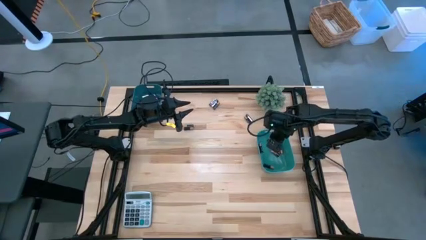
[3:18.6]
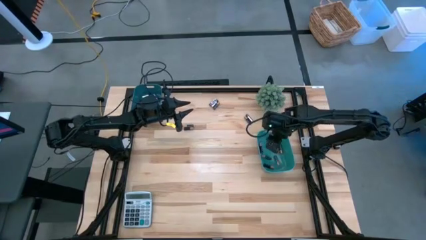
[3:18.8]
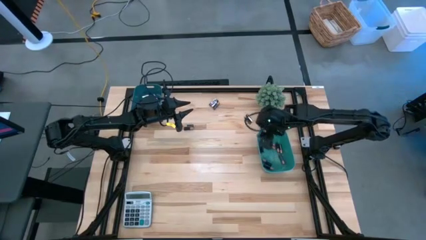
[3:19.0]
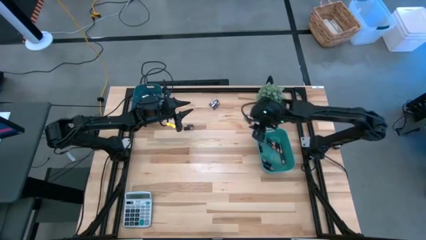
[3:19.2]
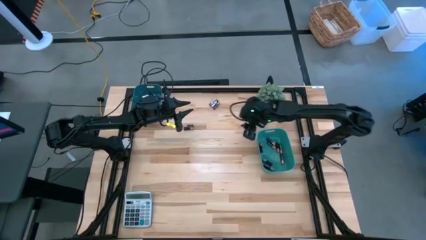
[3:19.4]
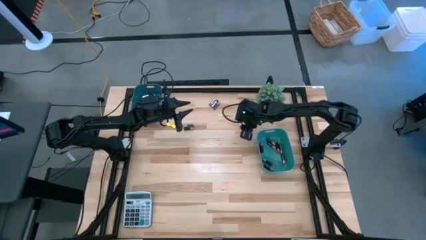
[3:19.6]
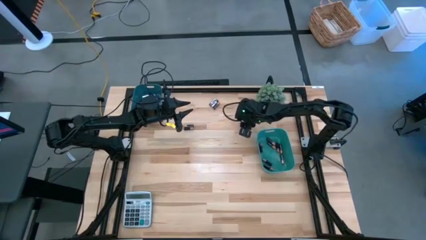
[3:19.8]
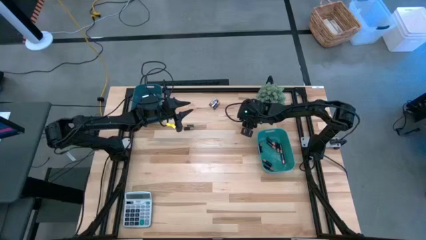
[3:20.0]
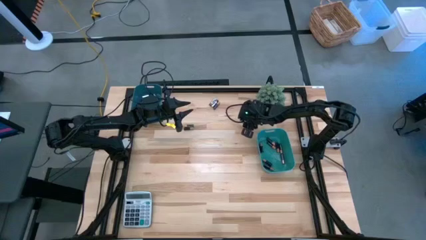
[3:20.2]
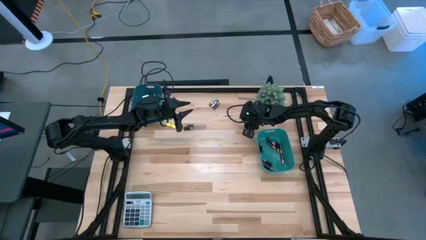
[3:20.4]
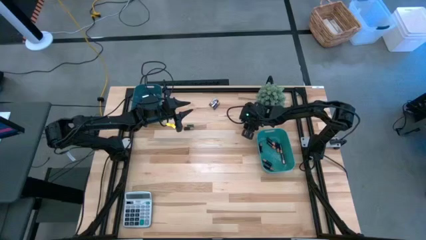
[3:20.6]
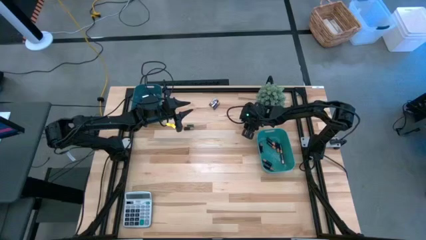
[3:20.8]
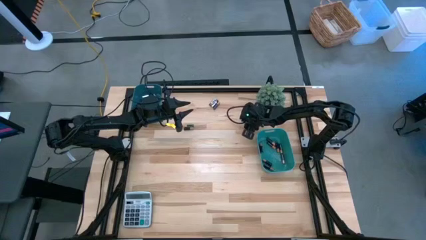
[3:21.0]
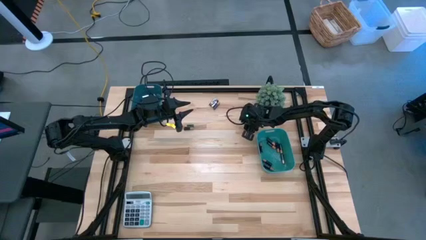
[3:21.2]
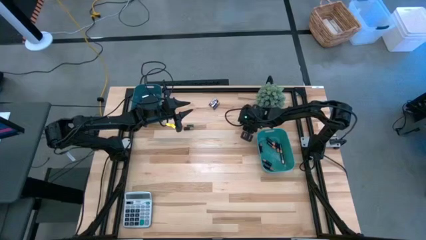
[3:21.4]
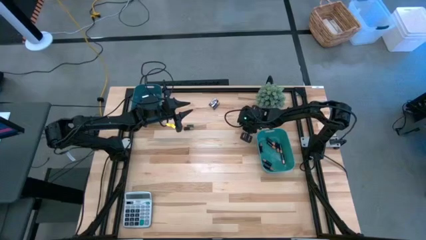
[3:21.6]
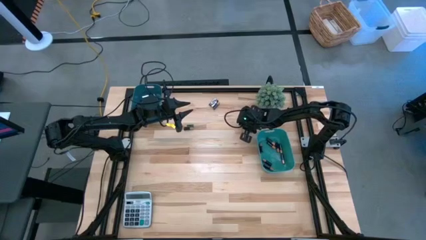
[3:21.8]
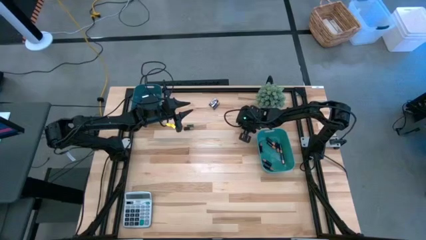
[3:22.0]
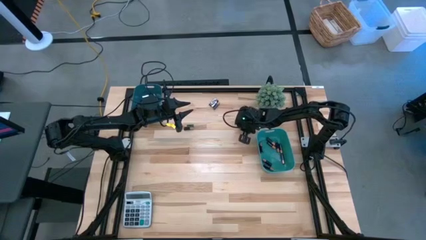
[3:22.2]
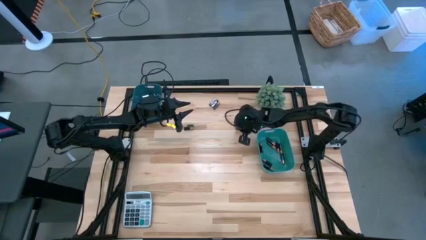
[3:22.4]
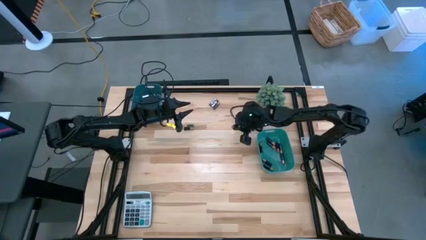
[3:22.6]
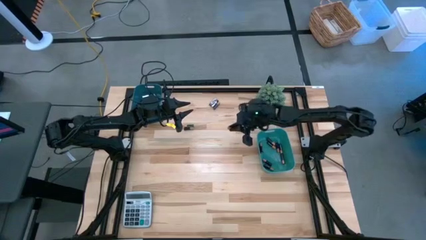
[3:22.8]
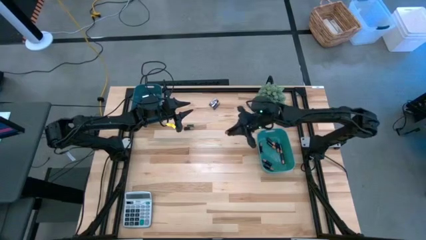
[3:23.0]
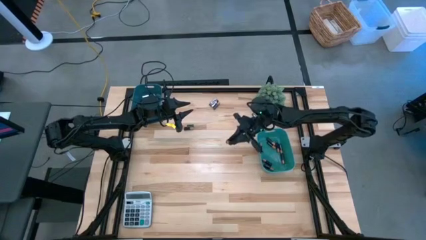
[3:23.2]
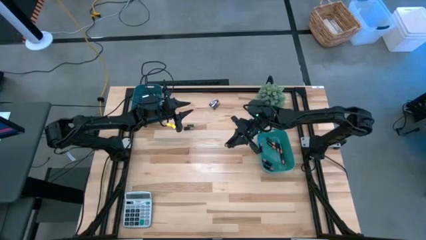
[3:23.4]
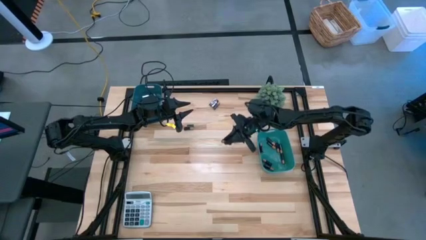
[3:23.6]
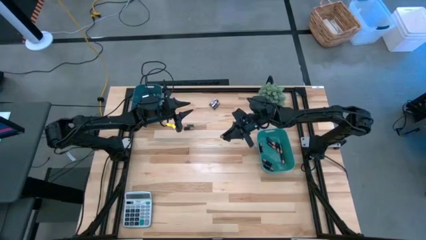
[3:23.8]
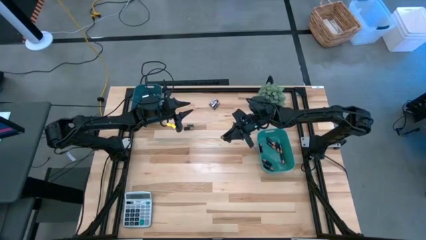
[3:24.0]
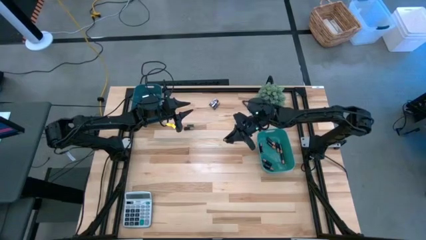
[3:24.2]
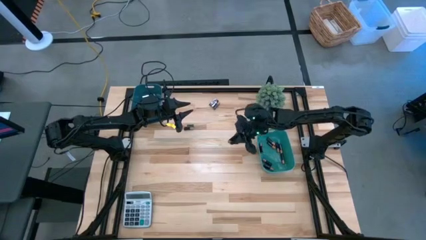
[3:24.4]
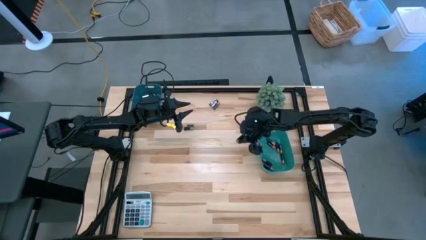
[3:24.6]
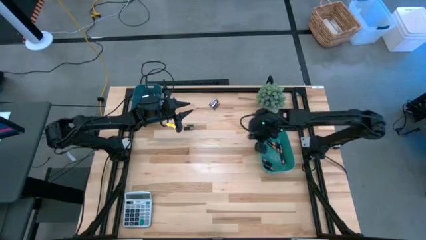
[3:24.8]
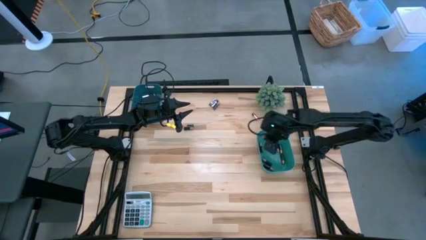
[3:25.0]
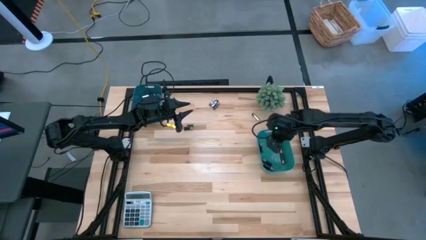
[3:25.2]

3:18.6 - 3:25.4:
Task: Sort batteries
Put the brown-block battery into the green bin

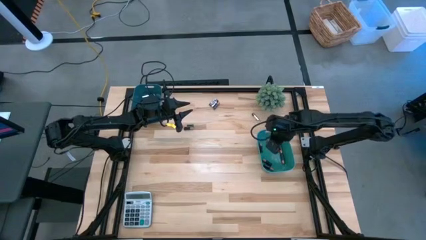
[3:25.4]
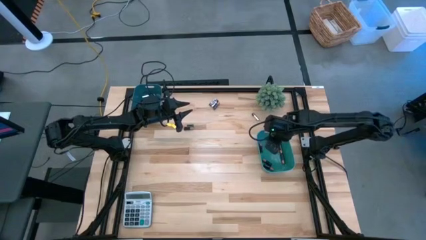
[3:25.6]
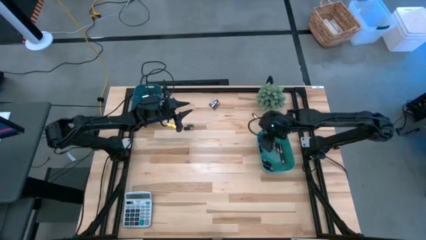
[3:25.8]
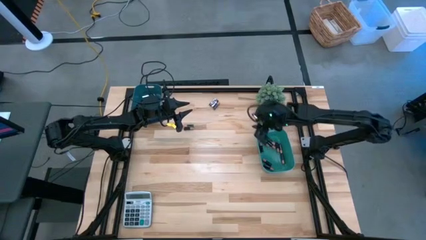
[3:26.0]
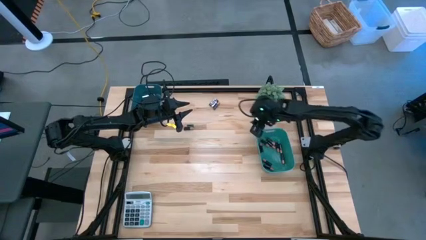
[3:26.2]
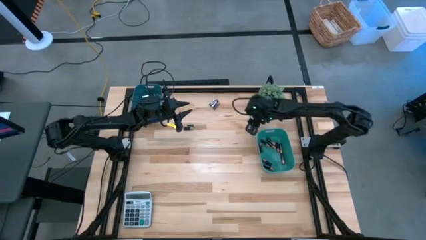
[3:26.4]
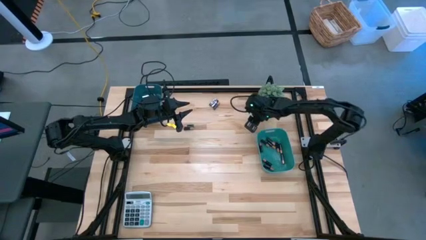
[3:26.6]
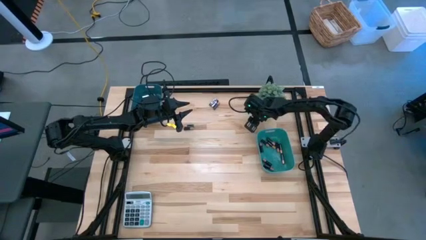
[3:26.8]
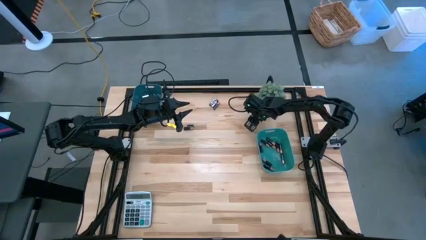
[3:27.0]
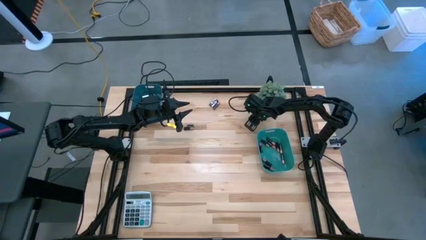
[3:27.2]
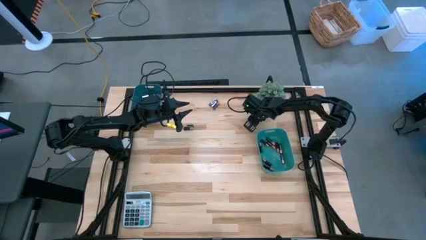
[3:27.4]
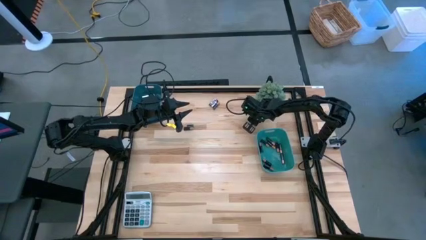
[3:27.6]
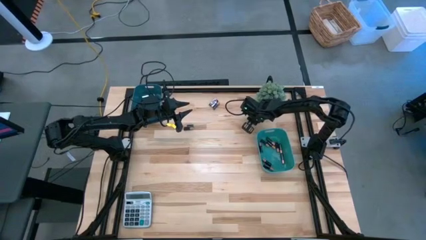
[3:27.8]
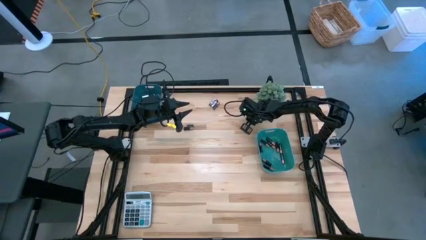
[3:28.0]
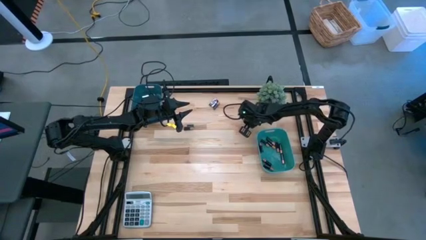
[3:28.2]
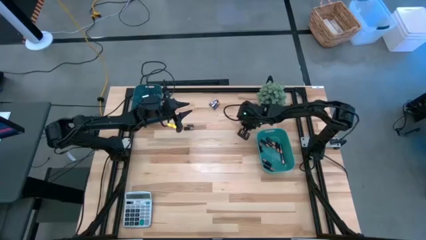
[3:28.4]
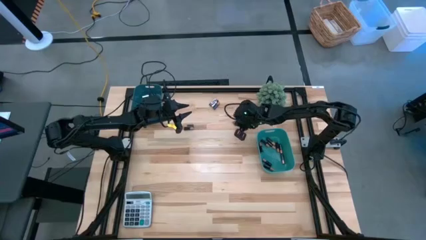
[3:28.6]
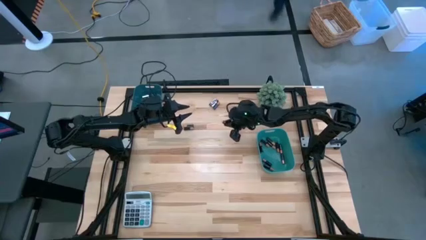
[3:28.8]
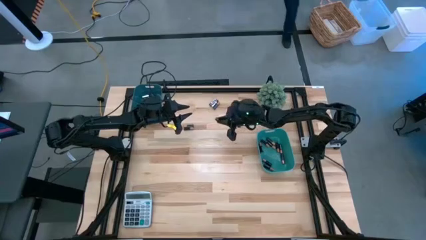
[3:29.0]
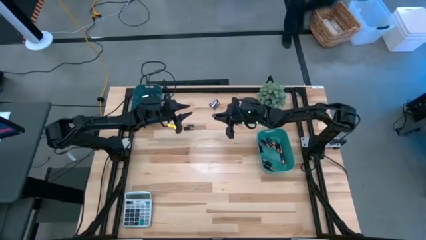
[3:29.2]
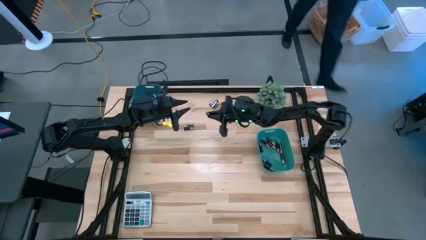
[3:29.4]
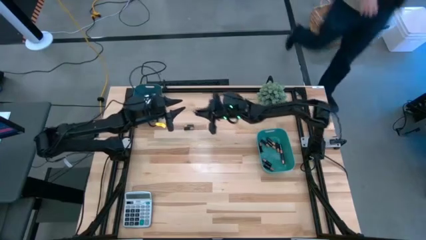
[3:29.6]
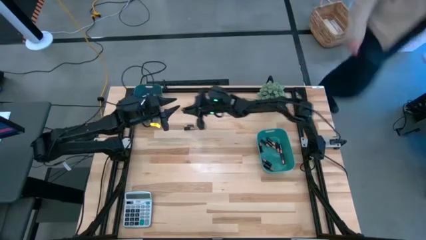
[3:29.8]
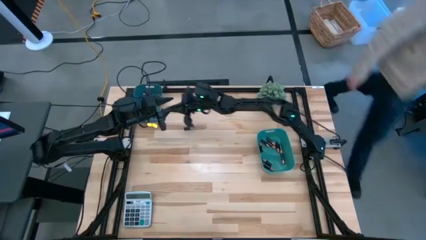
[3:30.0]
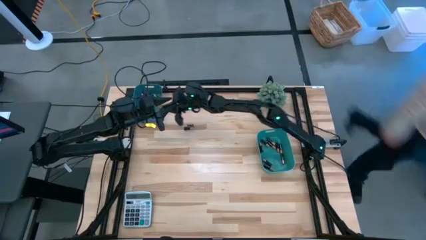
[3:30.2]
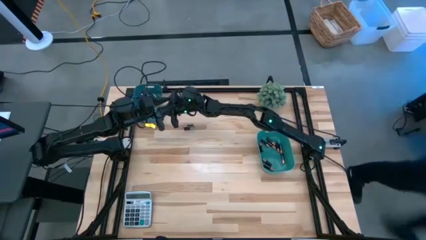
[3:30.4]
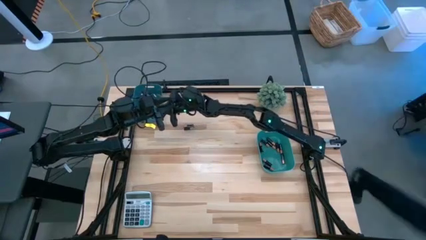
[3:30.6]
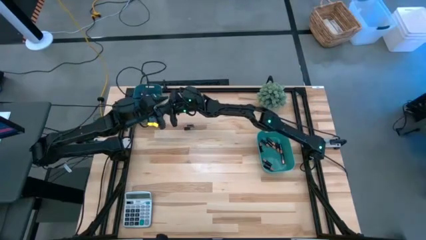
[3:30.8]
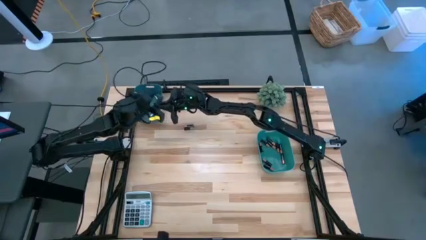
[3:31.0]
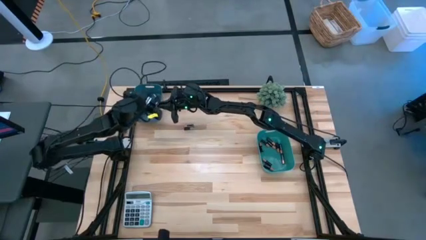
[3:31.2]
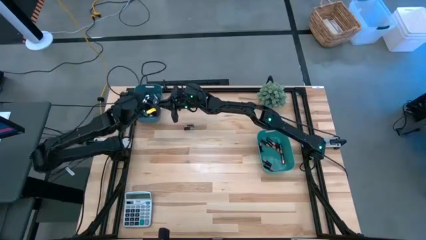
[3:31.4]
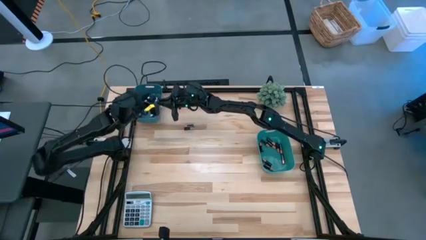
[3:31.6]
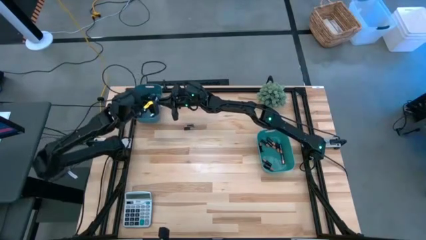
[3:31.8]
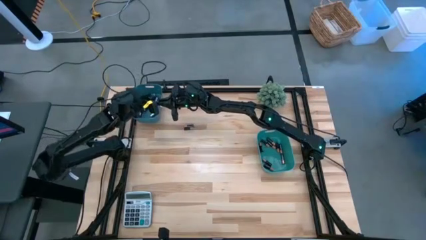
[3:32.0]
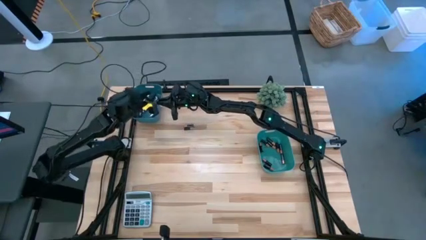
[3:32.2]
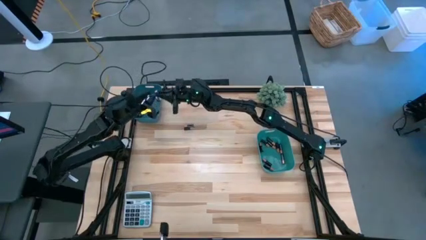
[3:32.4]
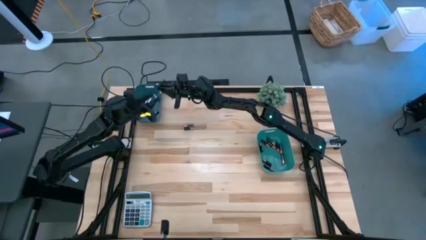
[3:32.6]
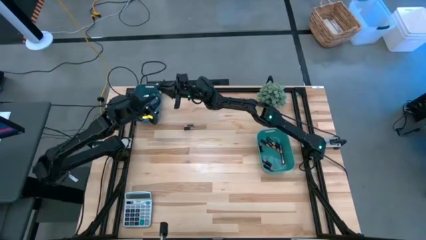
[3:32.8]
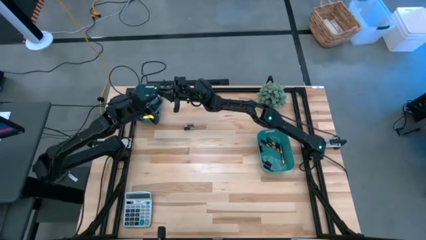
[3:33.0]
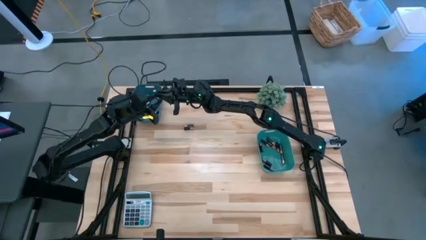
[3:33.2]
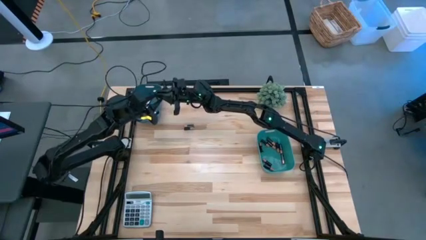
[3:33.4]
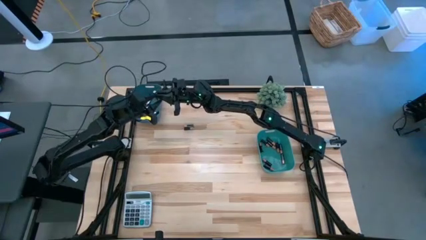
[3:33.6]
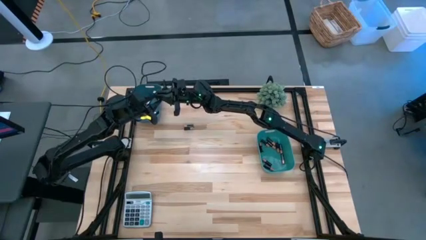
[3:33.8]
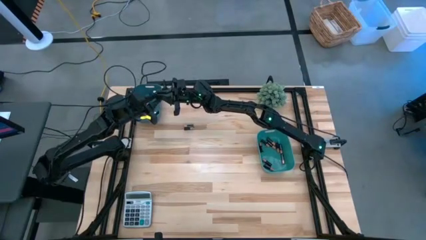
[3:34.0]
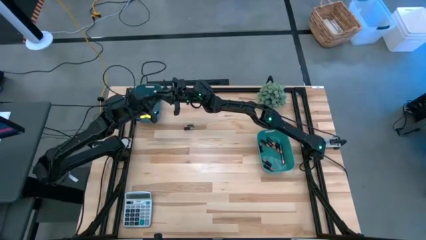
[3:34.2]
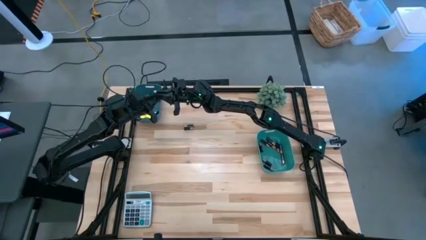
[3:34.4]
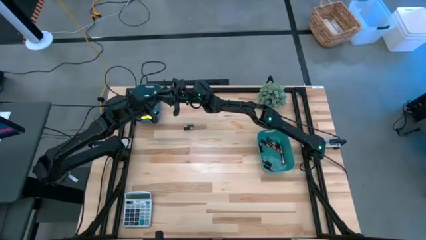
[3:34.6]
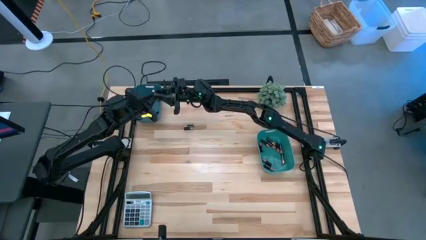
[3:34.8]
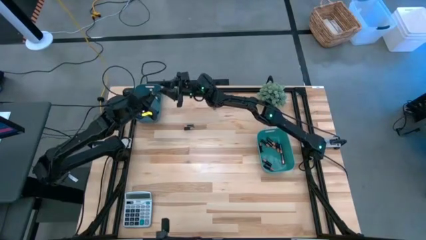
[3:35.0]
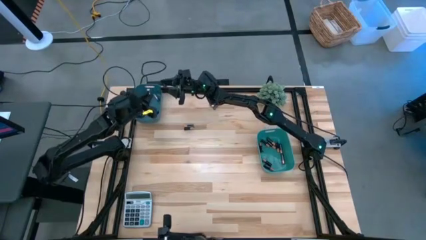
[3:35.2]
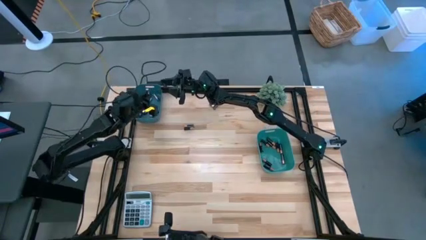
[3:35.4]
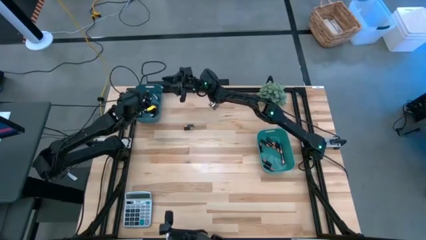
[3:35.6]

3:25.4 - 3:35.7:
Put the black-silver battery into the blue bin
